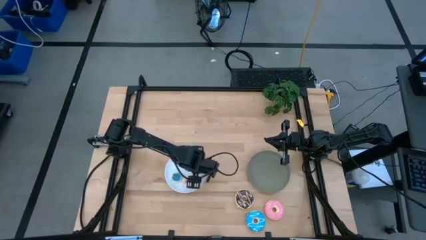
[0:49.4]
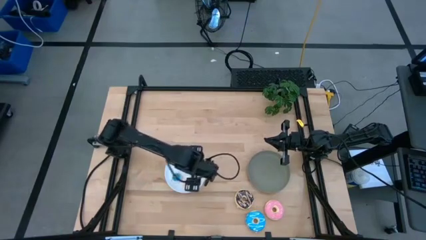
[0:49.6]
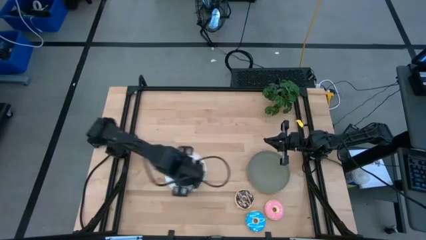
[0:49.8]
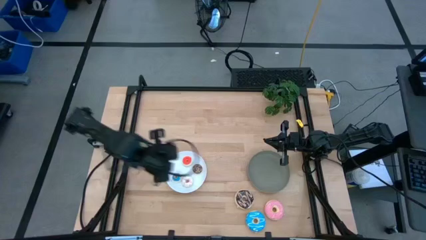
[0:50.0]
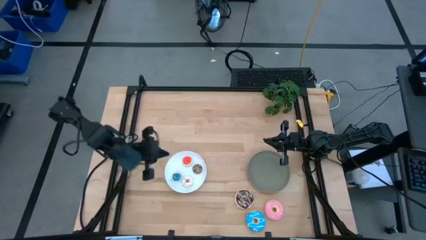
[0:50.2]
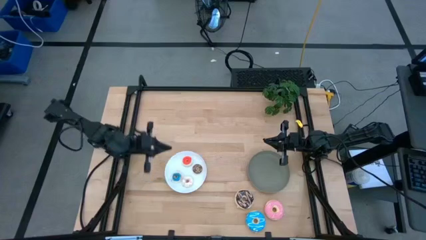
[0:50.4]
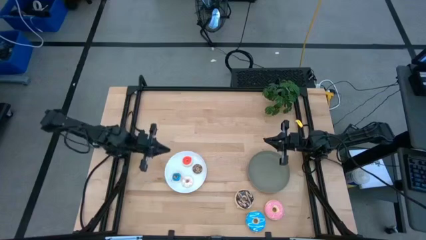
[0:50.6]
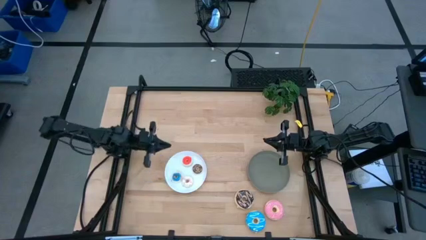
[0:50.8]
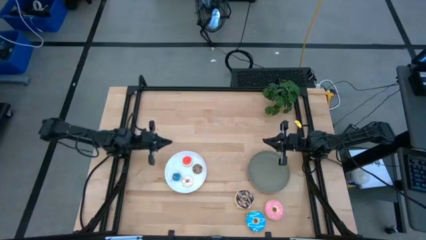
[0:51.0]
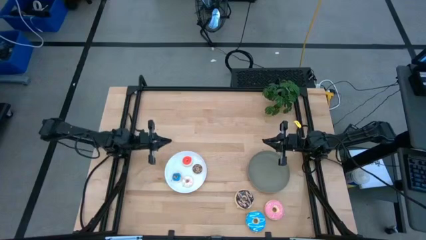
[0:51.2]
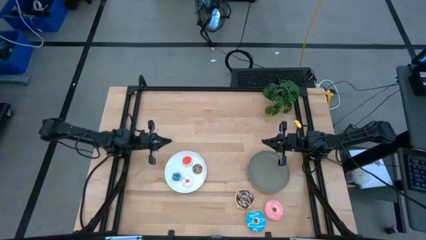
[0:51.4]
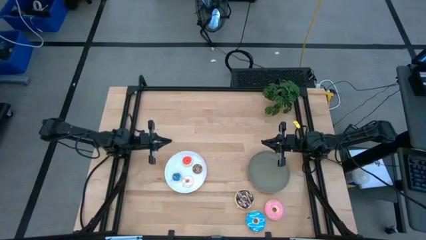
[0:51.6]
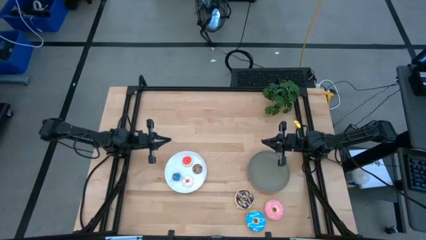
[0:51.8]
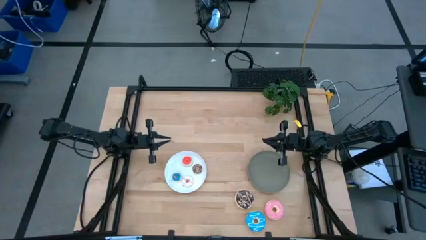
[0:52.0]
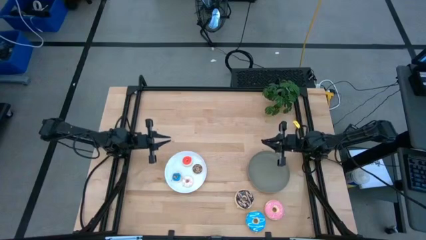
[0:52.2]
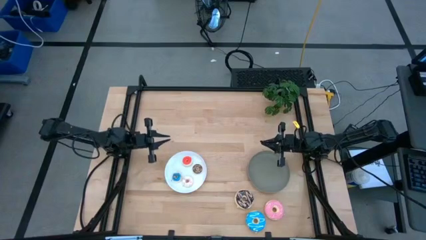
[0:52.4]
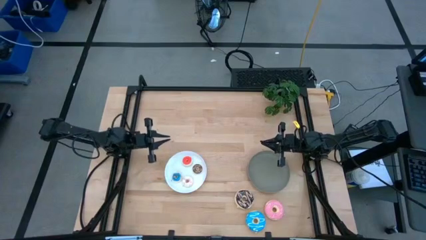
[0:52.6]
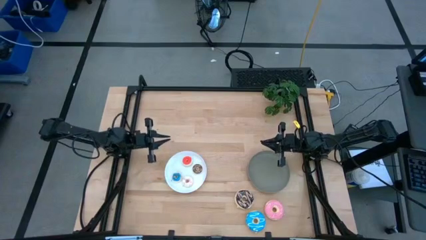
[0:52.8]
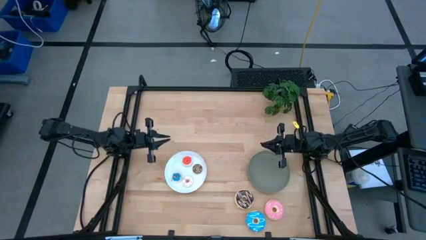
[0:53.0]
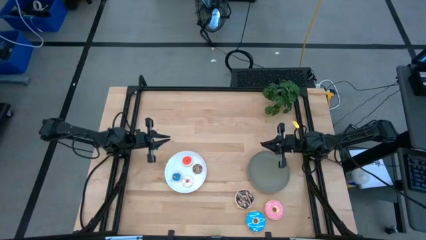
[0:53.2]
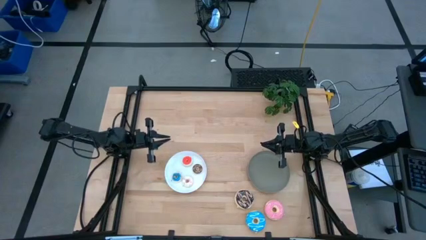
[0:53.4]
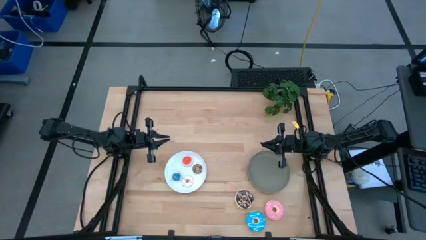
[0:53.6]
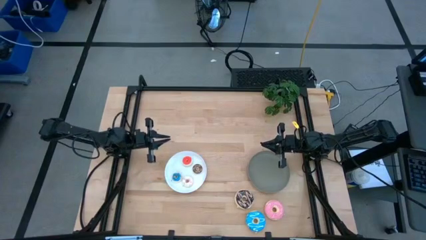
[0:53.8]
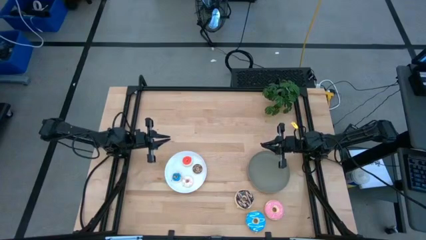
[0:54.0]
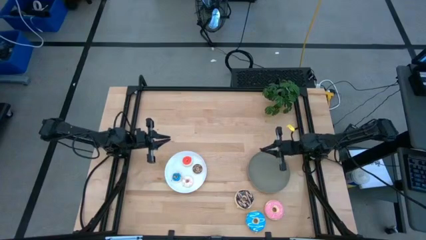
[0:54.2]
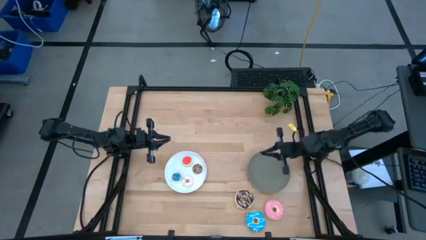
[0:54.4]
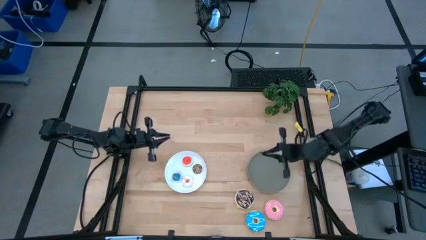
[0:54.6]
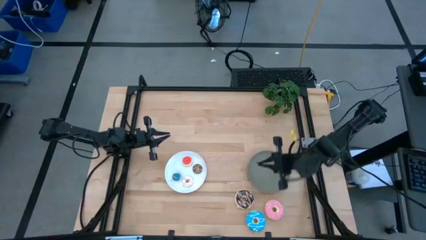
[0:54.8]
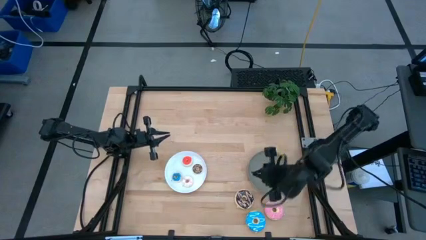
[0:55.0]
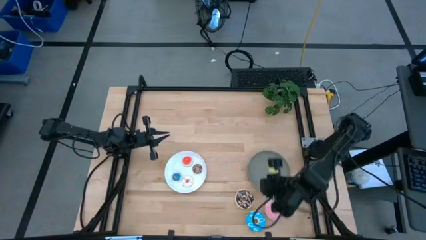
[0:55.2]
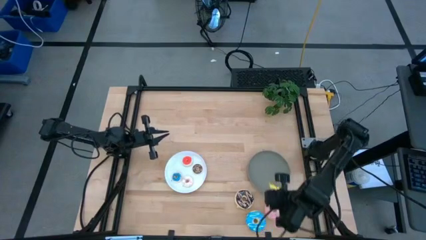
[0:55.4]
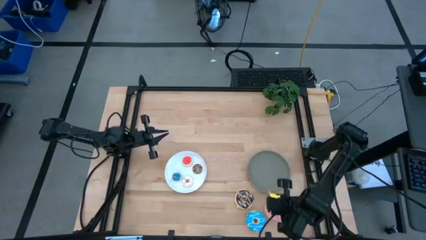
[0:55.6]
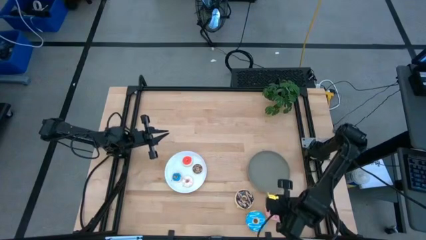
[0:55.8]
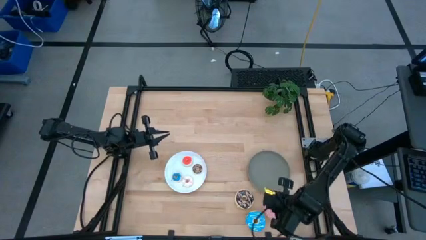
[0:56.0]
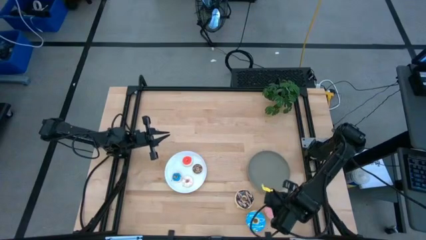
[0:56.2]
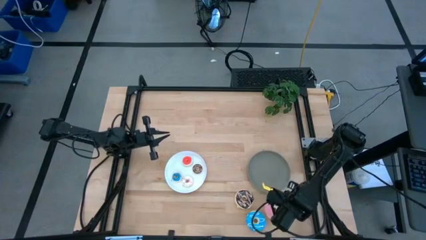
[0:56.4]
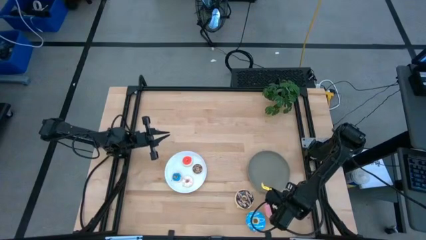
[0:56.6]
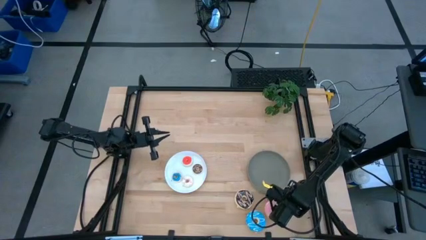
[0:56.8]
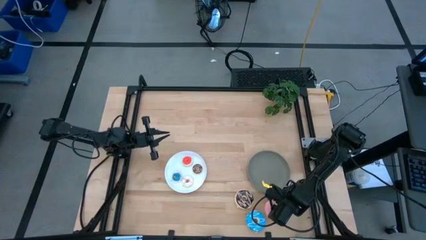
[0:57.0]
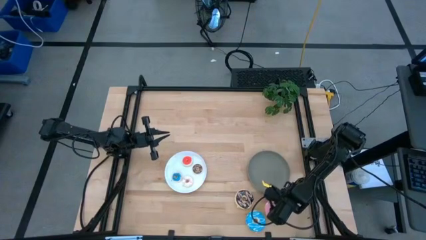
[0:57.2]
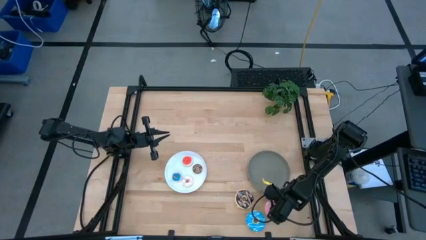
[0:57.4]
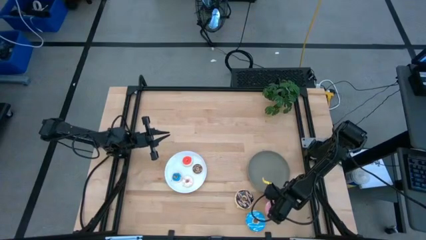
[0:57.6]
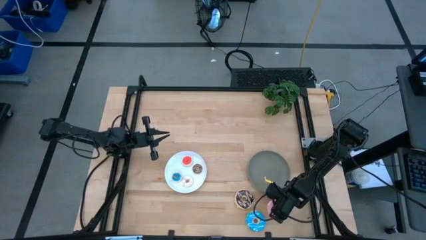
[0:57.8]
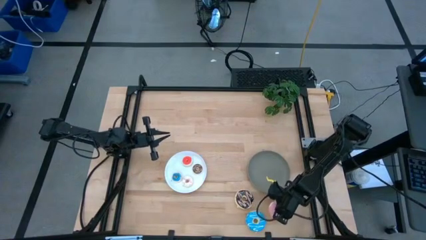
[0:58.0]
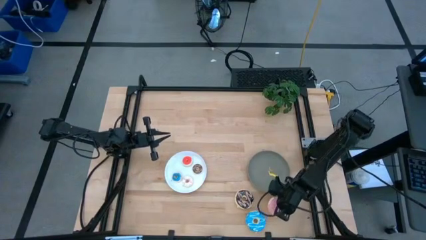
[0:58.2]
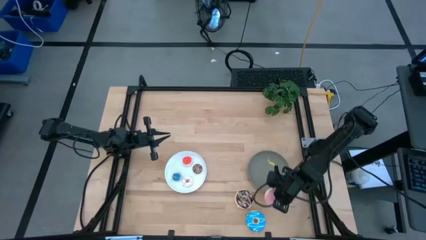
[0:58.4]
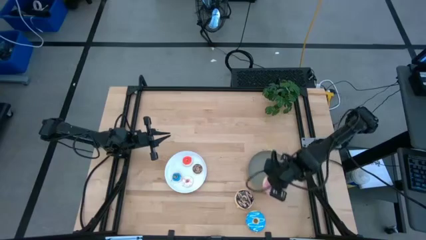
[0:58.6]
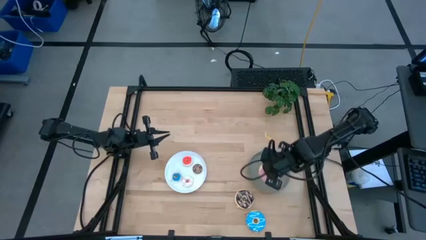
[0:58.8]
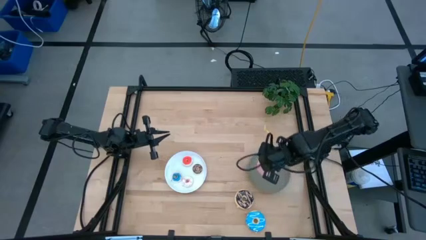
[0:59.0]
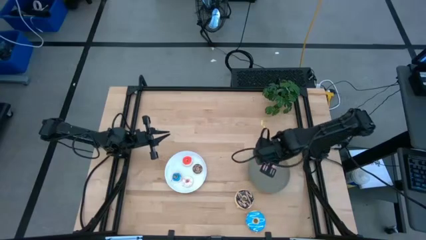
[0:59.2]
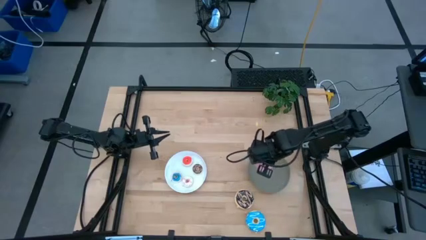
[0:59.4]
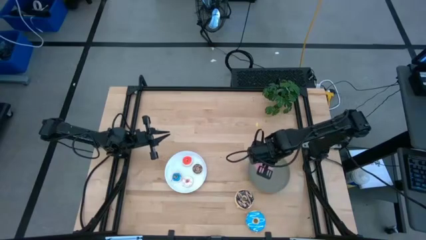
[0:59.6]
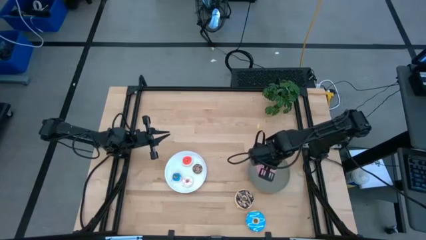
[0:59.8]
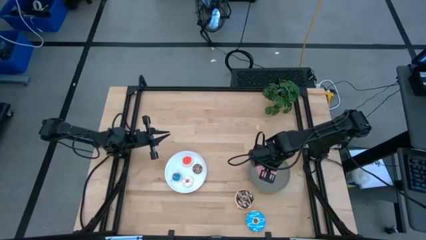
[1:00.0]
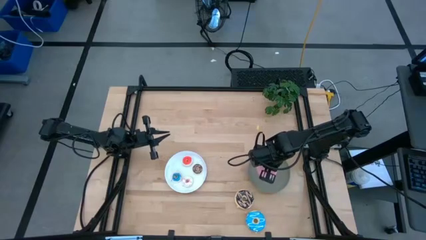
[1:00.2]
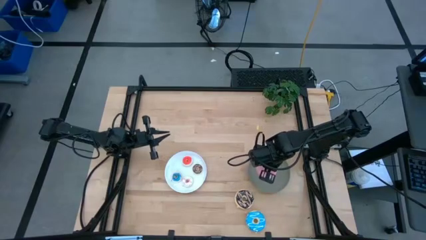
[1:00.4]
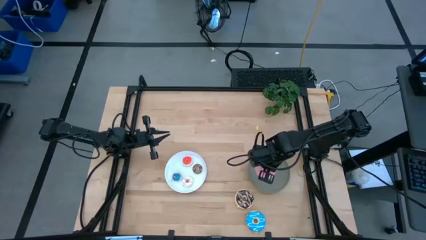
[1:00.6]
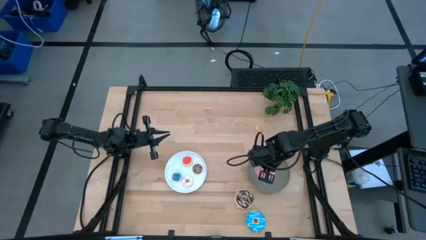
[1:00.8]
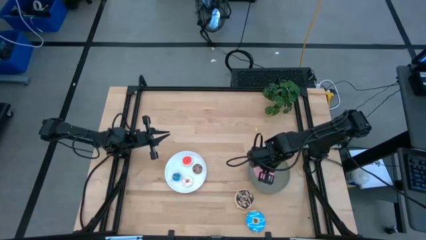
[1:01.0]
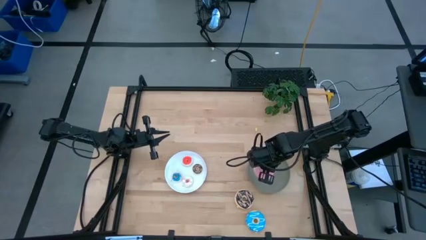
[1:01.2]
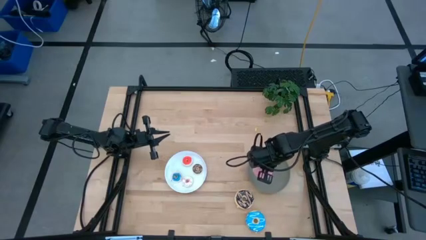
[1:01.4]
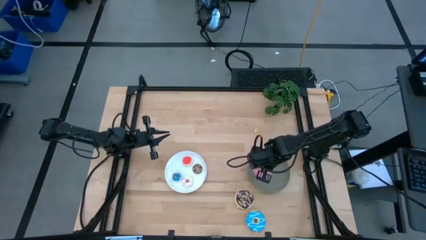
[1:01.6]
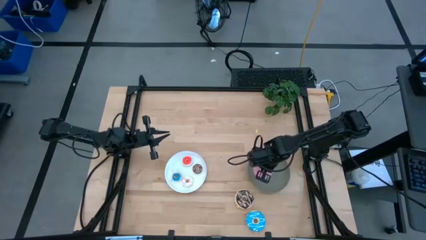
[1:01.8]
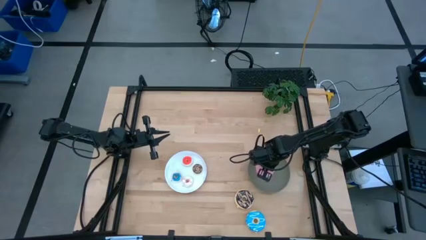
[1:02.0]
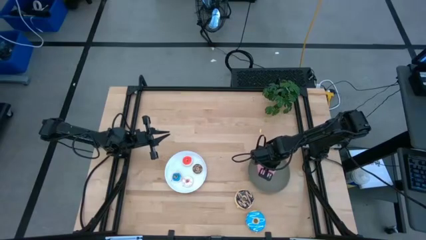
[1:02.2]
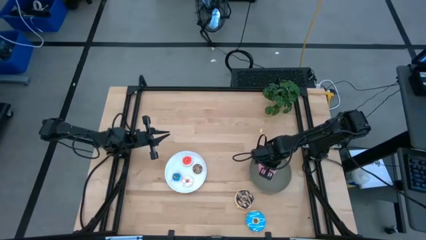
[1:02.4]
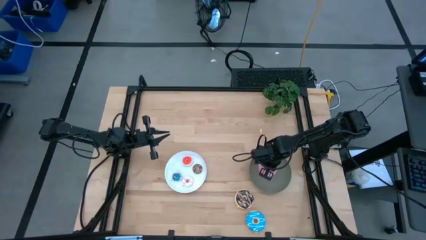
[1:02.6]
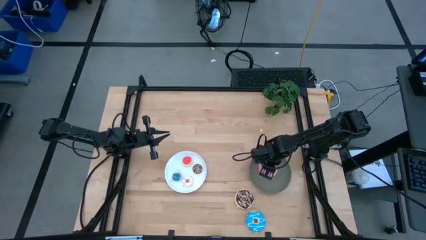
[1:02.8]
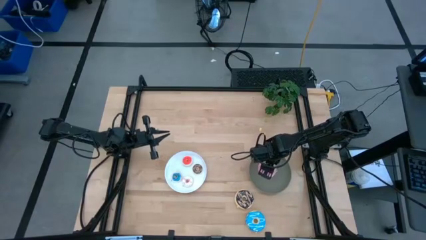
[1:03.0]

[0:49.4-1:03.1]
Task: Pick & Place donuts
Put the large pink donut on the gray plate

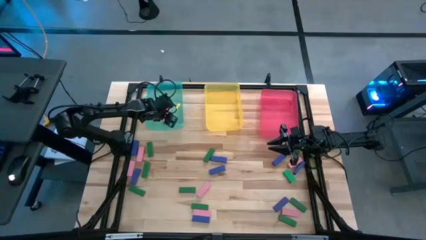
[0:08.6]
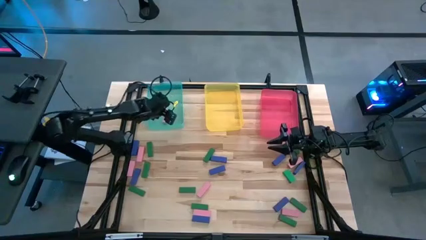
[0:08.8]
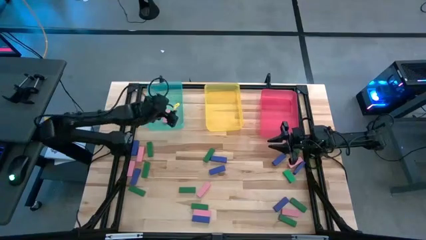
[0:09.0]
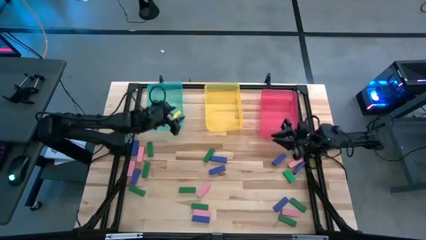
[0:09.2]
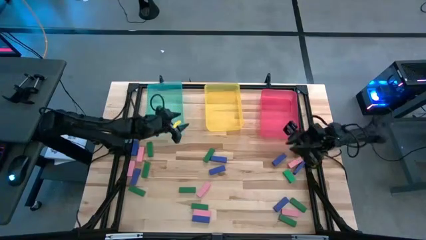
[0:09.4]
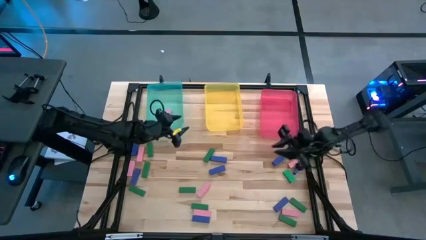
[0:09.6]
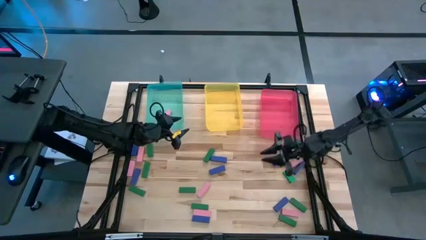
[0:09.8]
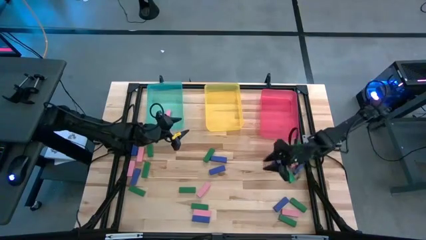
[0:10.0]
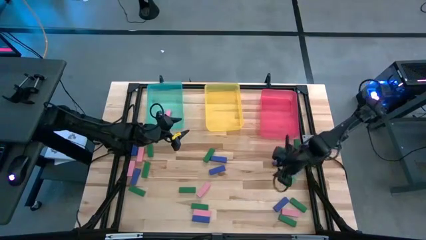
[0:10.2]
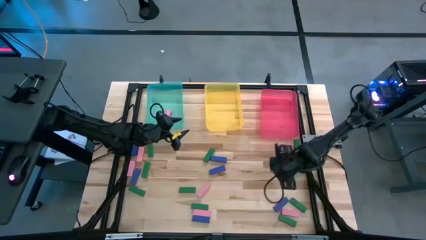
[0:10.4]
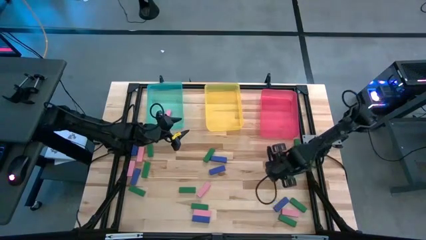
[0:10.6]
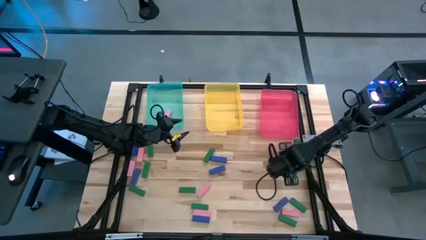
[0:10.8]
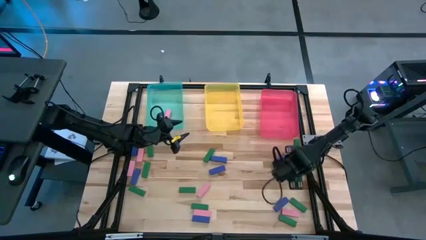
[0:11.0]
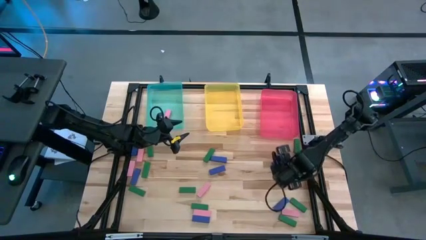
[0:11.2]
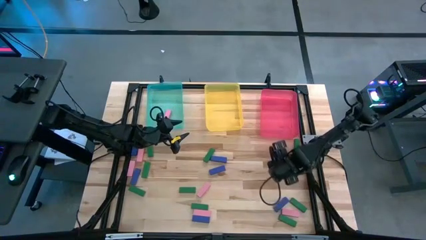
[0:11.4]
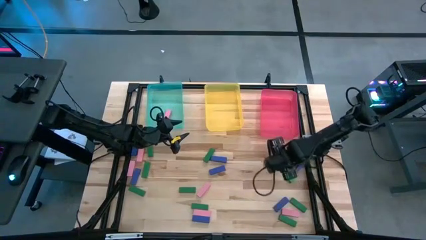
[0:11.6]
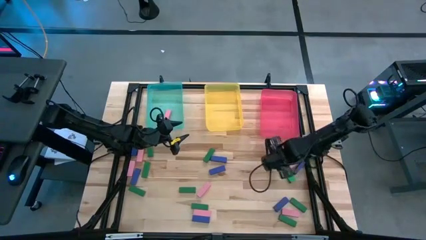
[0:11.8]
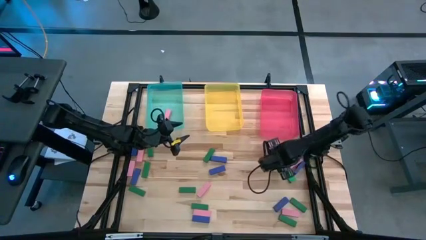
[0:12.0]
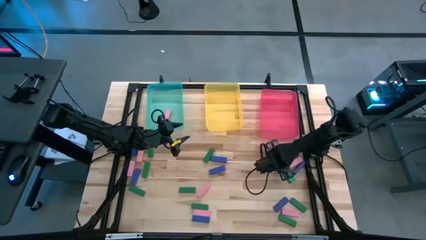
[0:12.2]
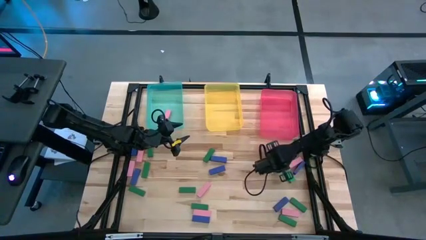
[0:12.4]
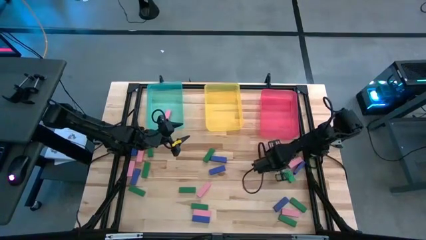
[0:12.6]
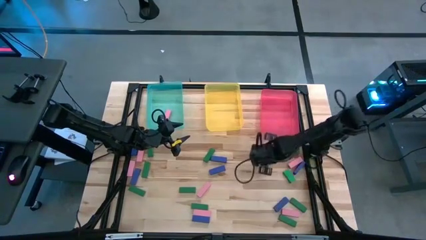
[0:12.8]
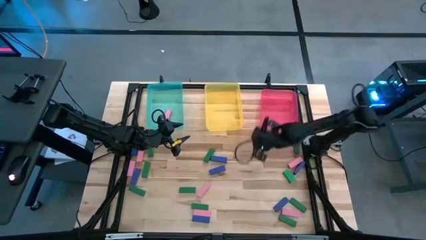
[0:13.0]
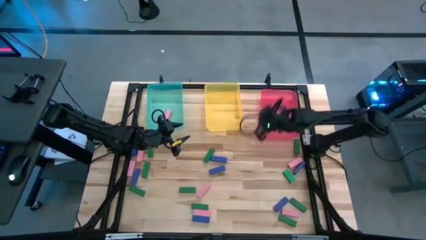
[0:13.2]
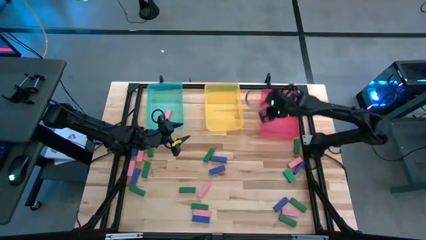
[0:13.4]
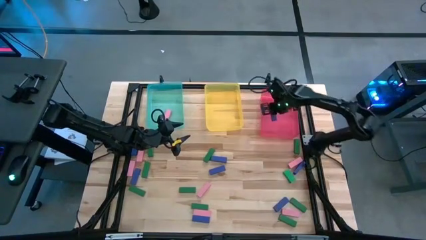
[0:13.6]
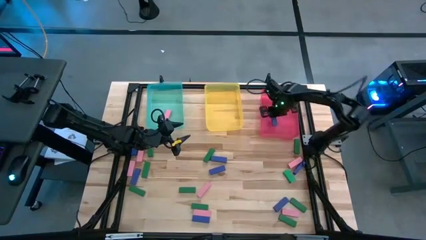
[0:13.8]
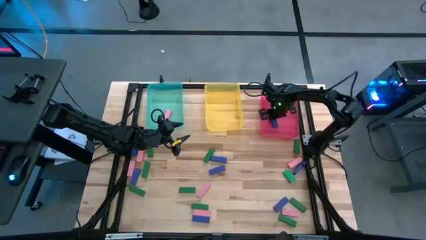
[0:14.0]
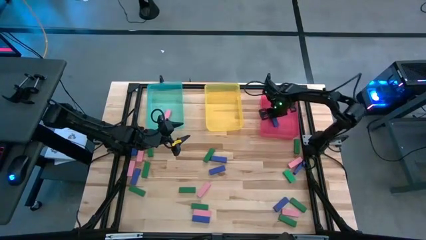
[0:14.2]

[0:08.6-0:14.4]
Task: Sort blocks
Put the blue wooden block into the red bin
